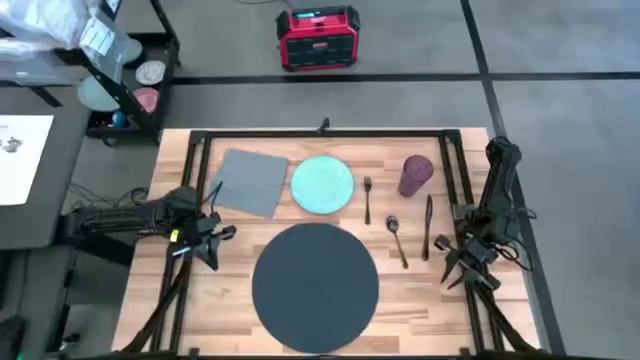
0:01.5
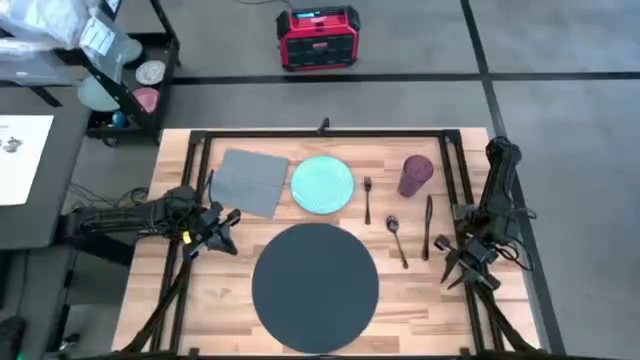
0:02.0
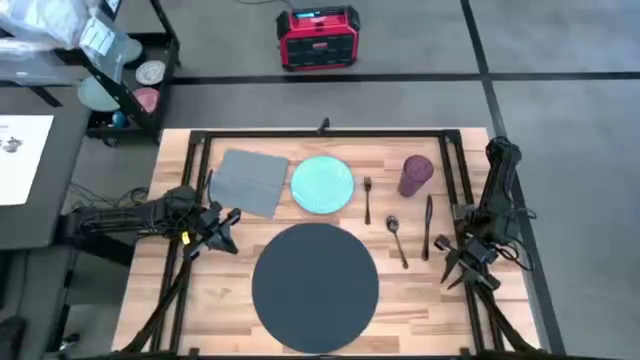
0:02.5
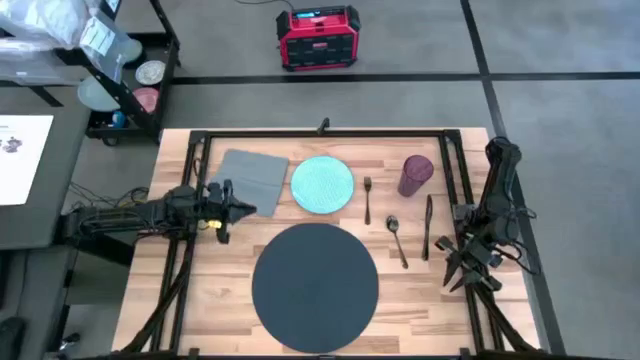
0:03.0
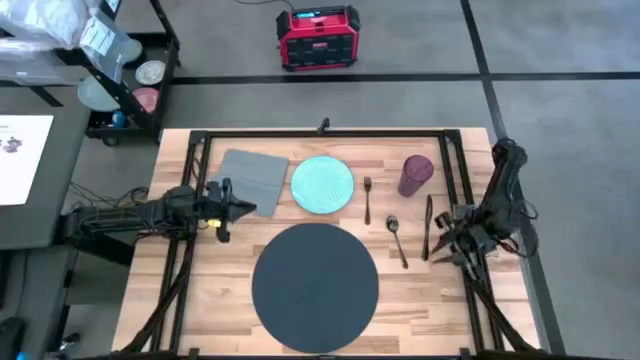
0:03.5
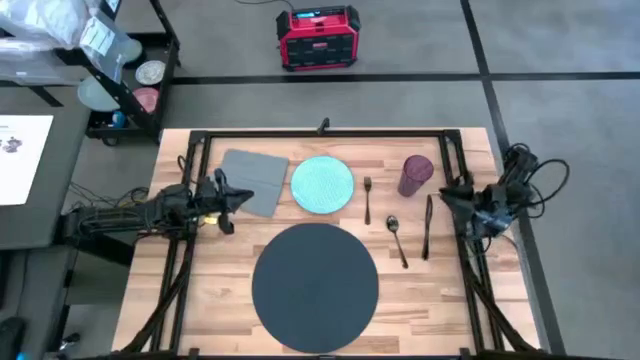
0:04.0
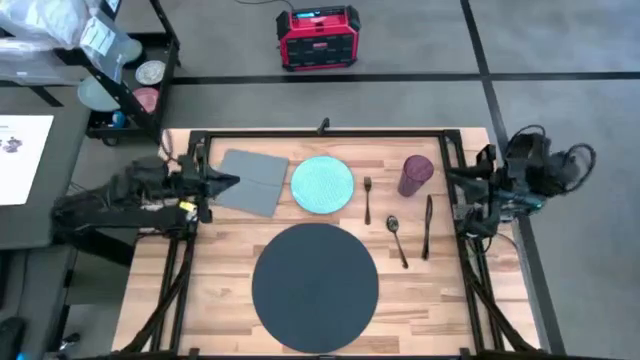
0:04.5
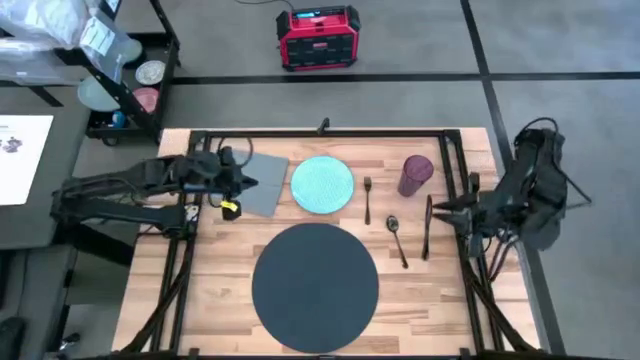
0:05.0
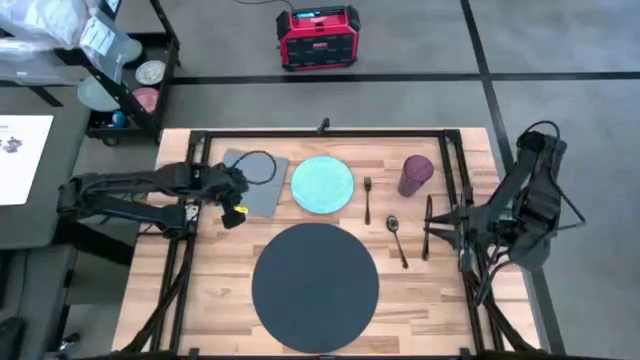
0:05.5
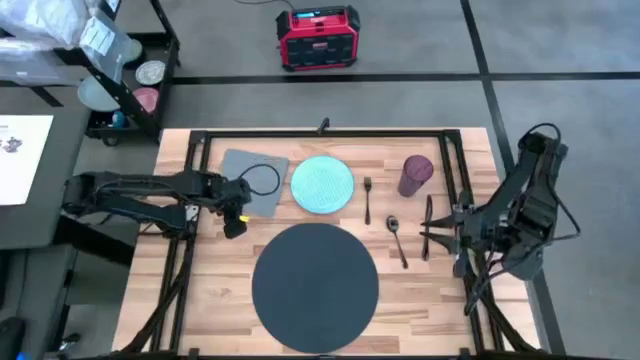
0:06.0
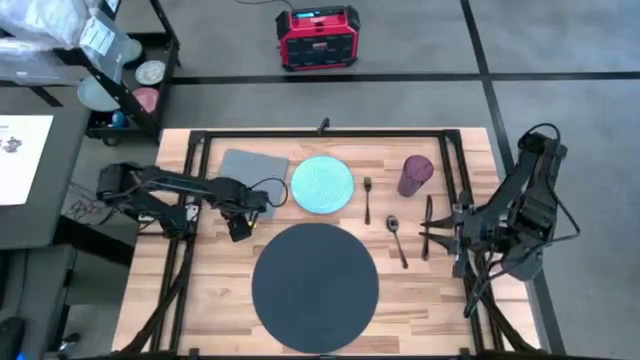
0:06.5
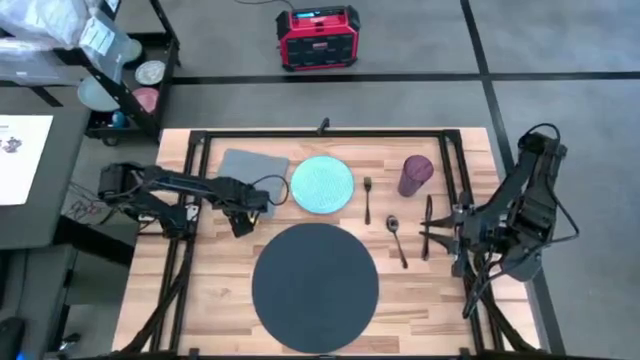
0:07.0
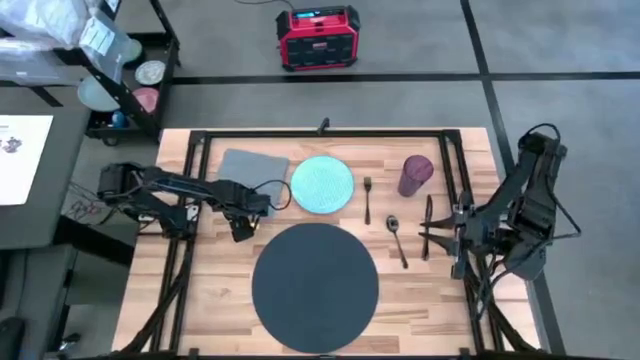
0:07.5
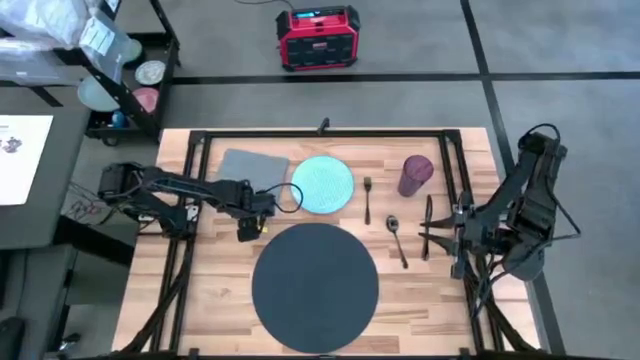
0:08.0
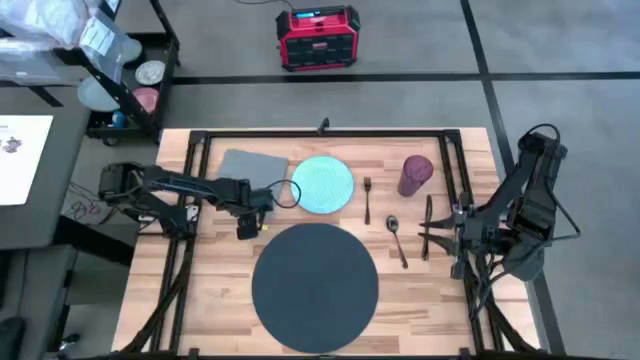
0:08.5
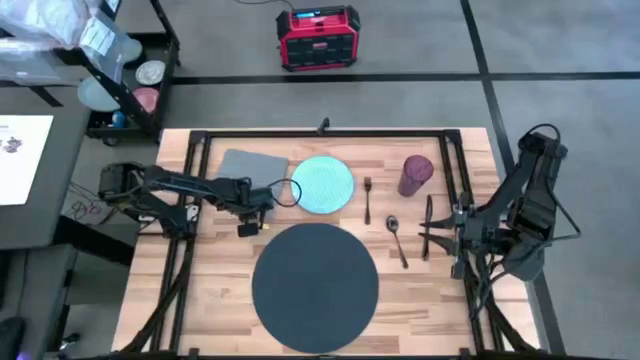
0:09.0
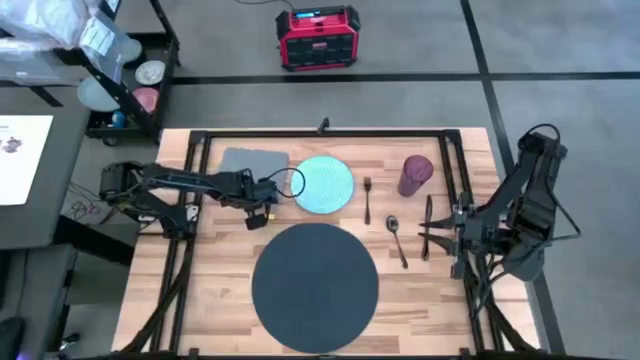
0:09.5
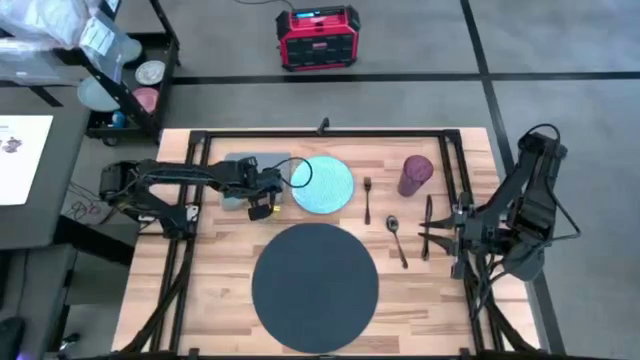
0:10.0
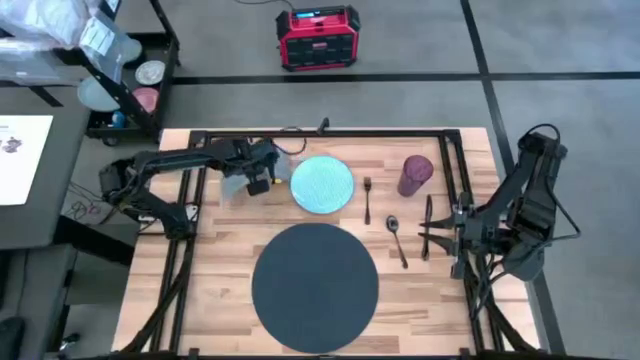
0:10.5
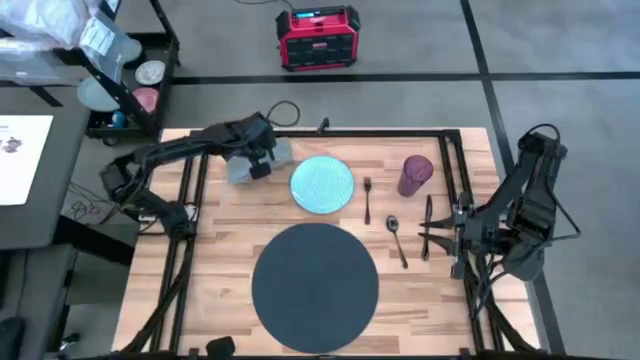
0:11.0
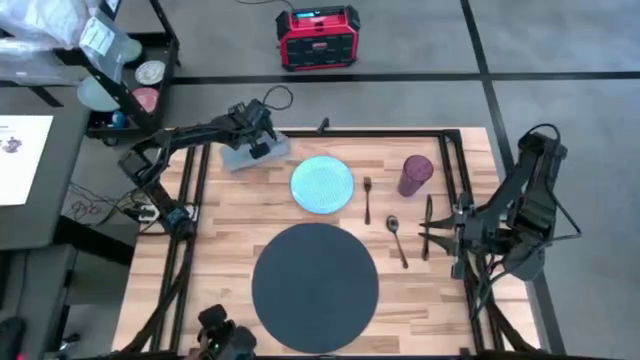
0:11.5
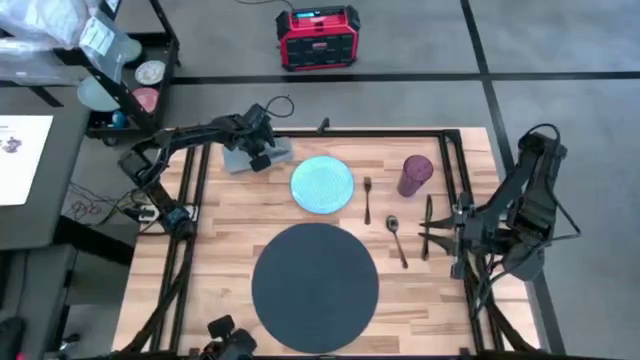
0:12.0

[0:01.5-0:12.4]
Task: Set table place
Fold the gray table napkin

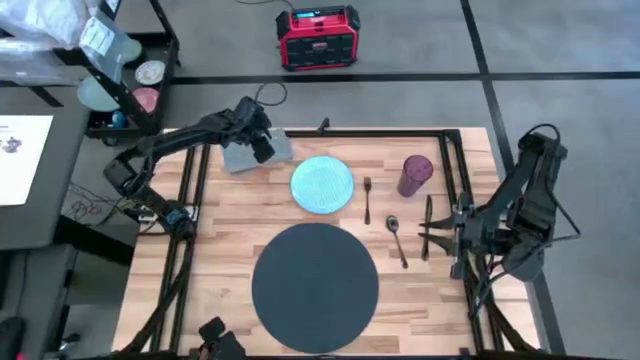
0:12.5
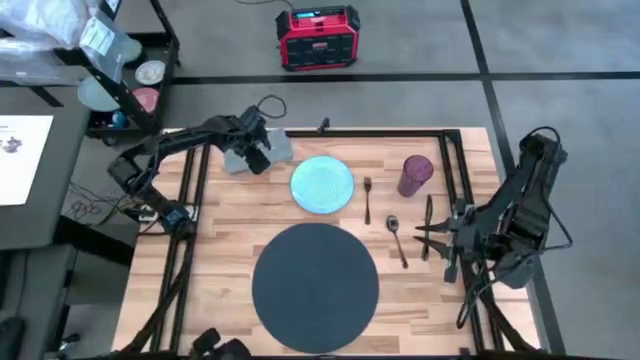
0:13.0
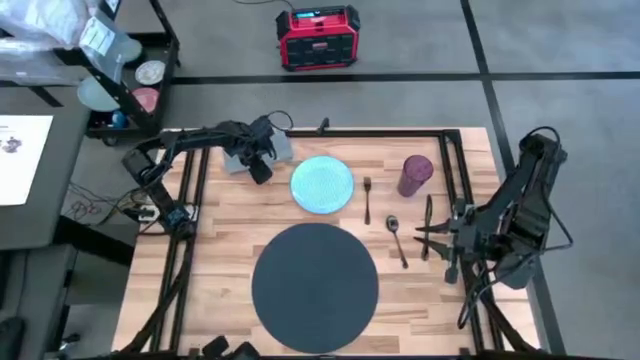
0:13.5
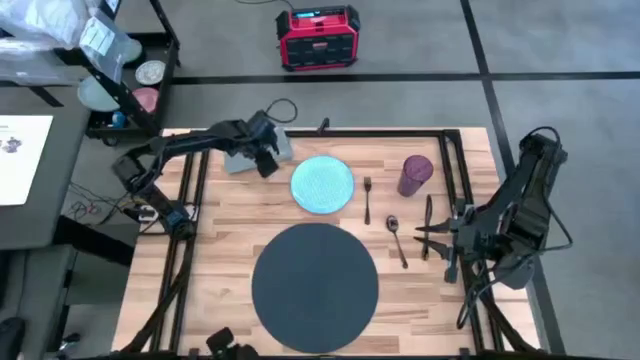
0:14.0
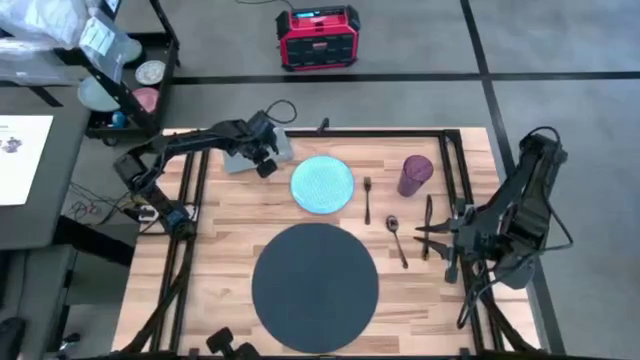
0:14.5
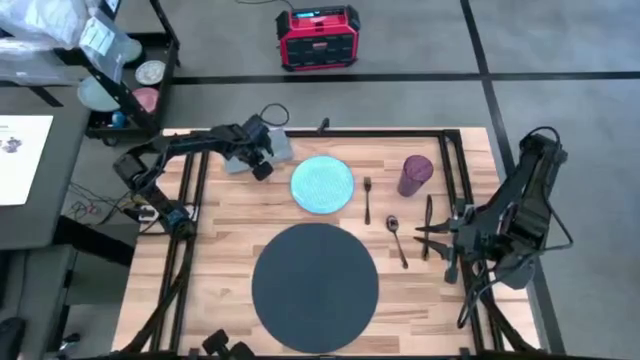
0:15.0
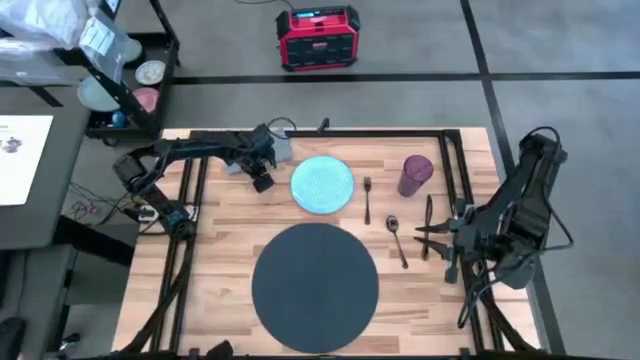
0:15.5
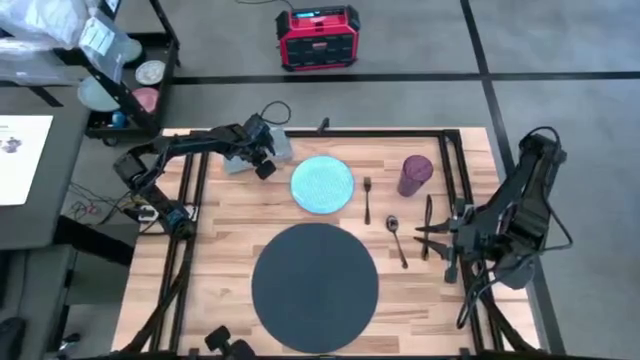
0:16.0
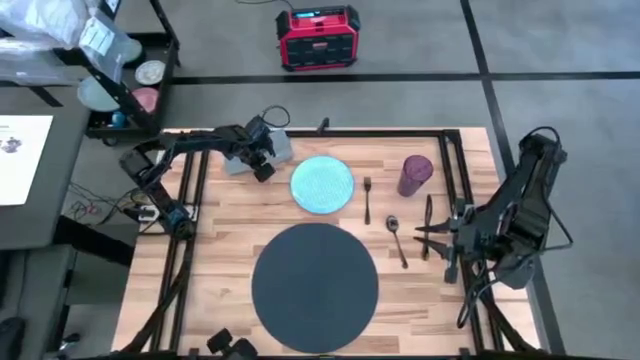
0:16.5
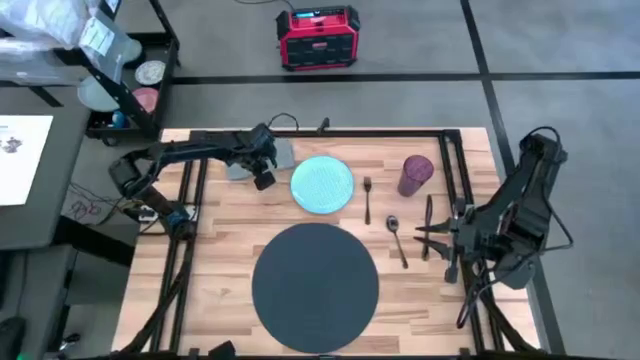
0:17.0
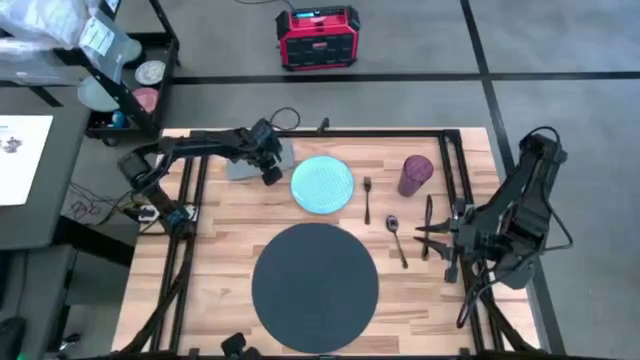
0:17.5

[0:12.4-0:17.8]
Move the gray table napkin to the left of the black tablemat

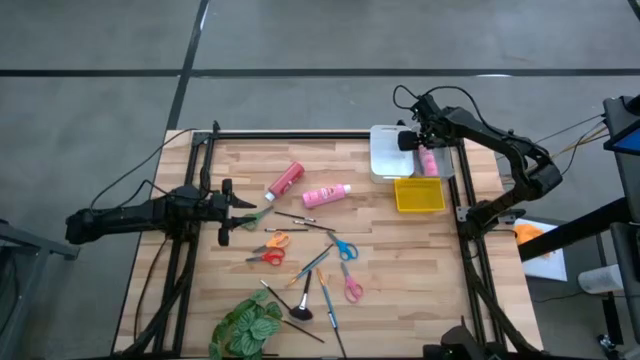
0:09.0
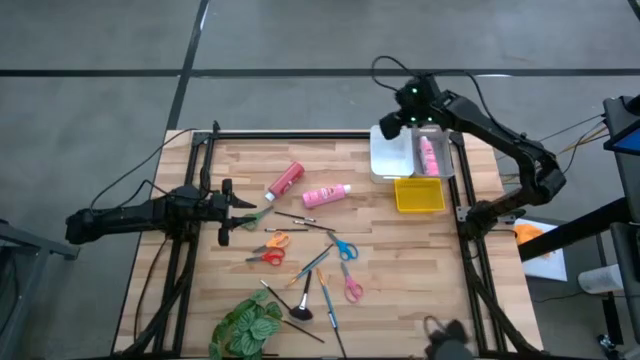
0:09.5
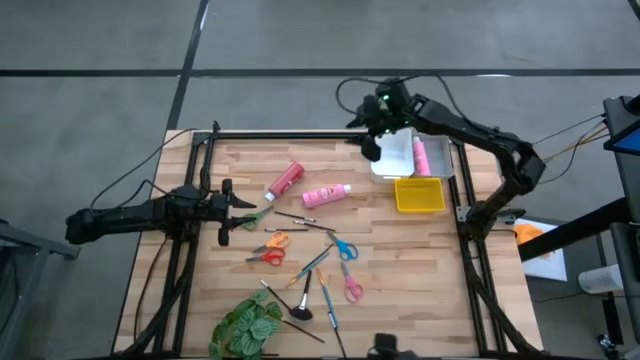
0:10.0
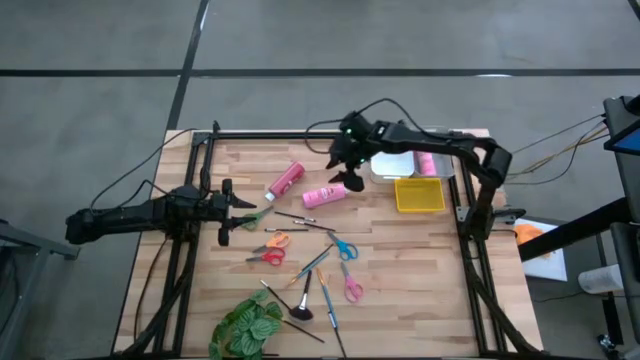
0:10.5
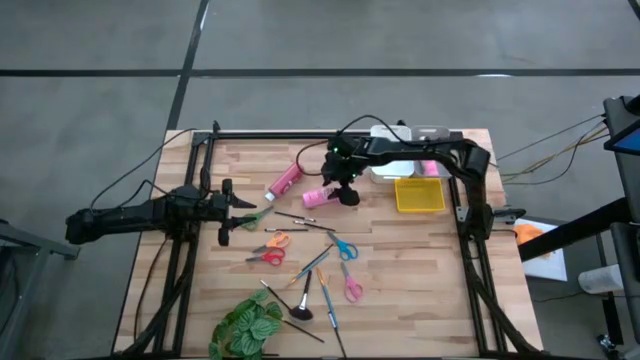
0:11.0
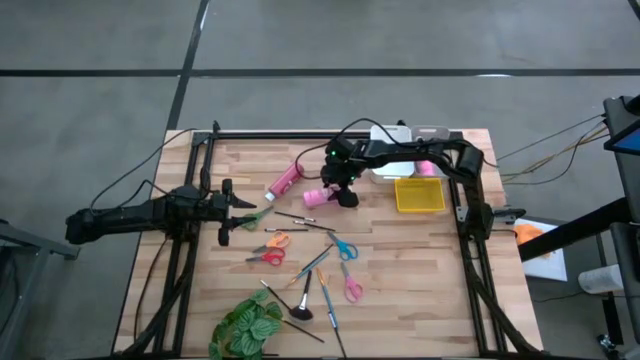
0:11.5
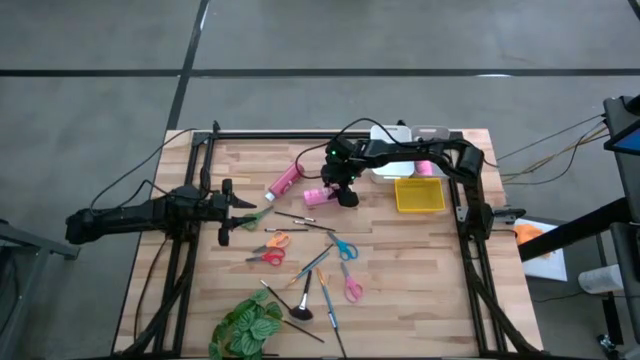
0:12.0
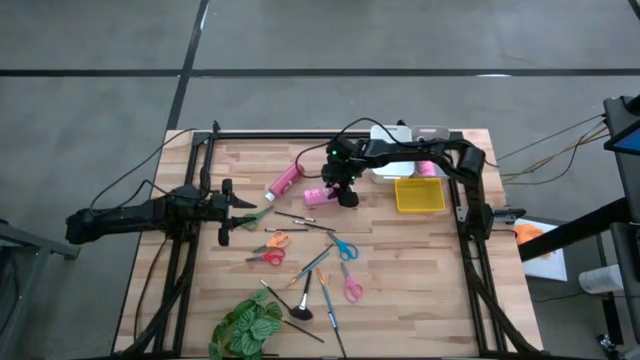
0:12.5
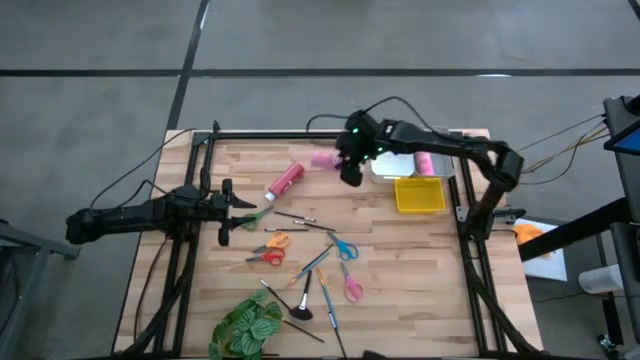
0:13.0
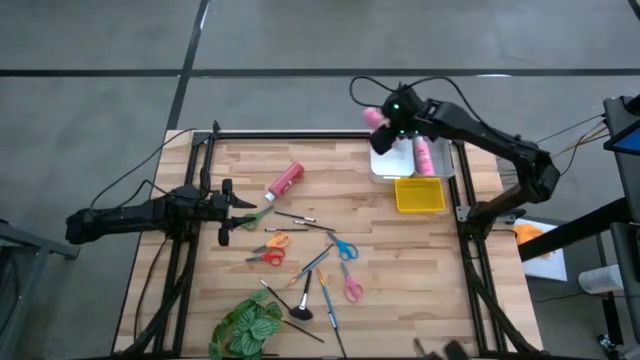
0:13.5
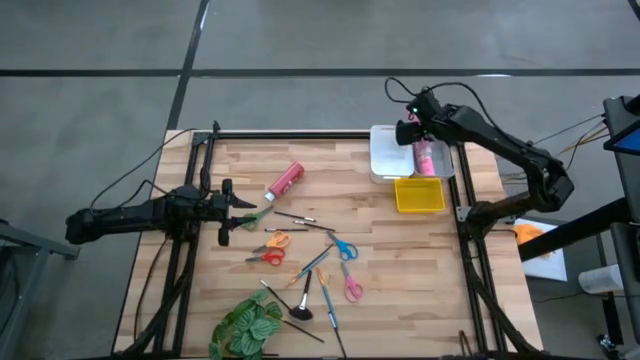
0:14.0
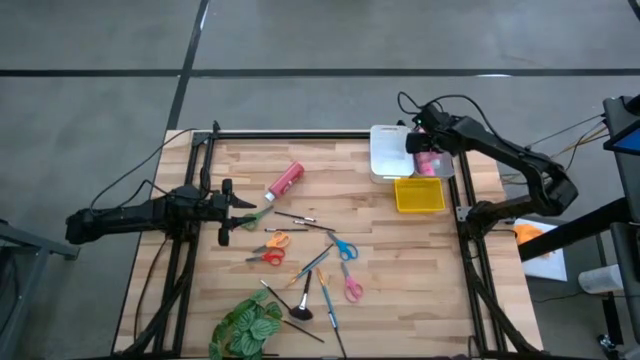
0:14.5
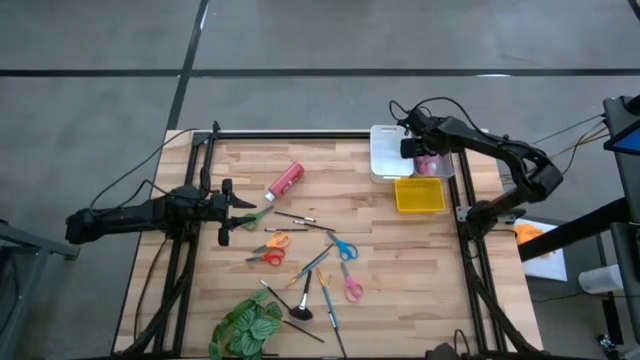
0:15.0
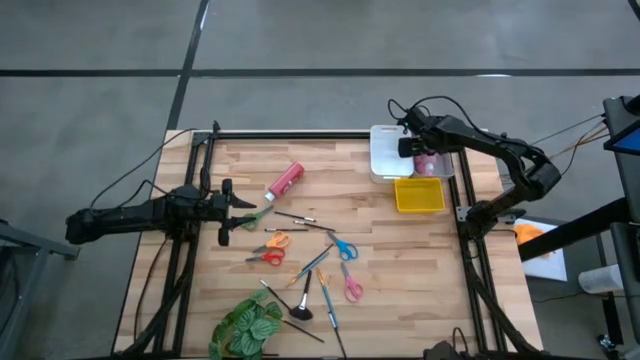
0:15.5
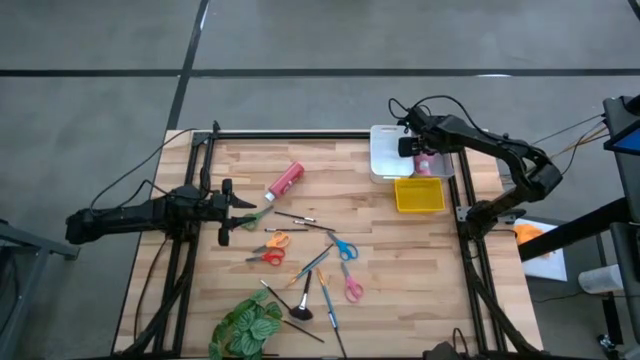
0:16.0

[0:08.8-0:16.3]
Task: Pick & Place Paint Supplies
Put the pink paint bottle into the gray bin
